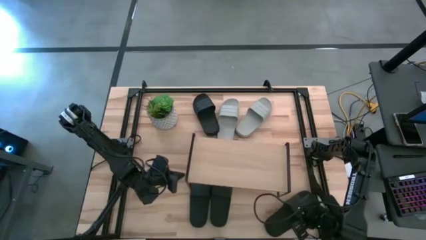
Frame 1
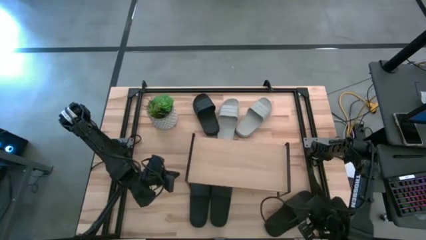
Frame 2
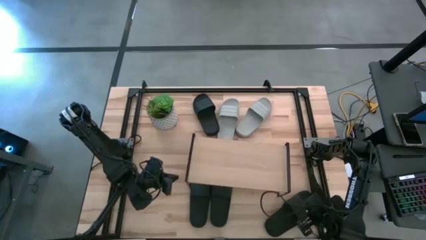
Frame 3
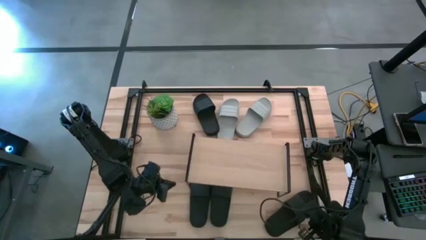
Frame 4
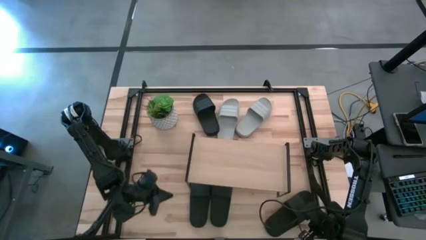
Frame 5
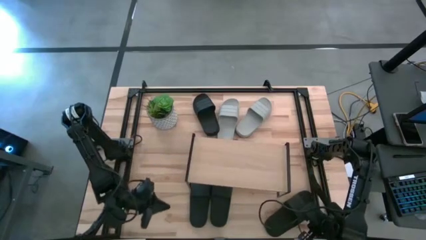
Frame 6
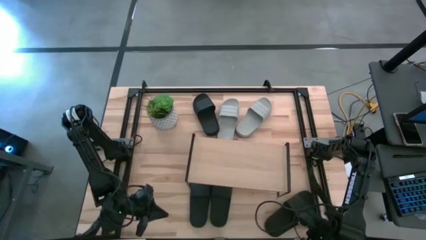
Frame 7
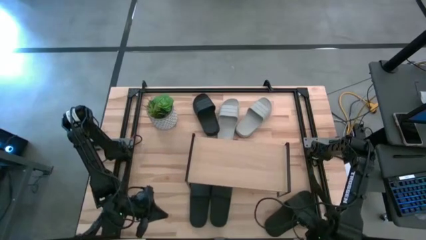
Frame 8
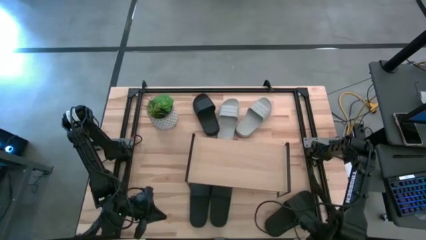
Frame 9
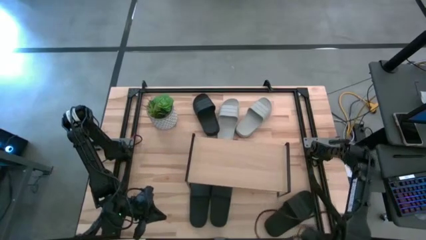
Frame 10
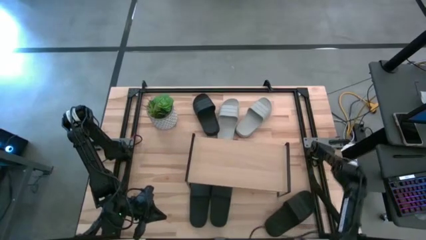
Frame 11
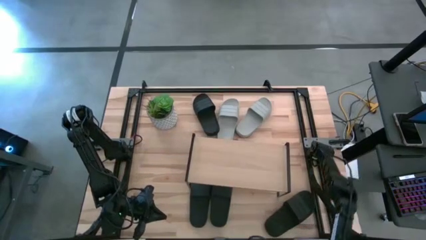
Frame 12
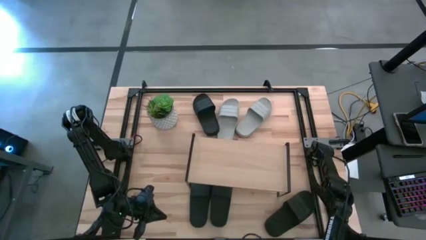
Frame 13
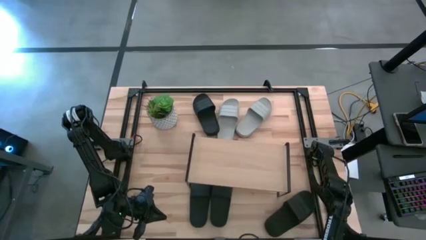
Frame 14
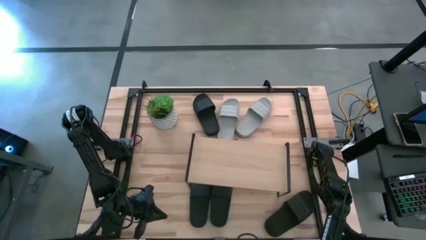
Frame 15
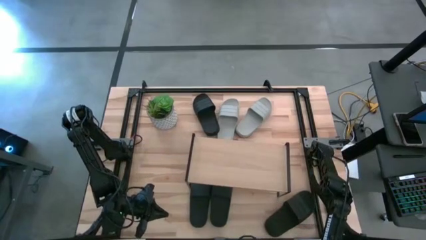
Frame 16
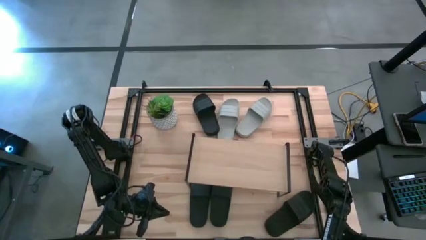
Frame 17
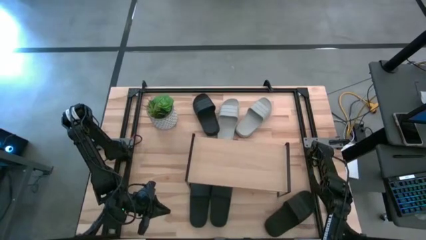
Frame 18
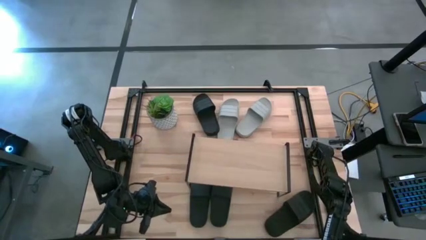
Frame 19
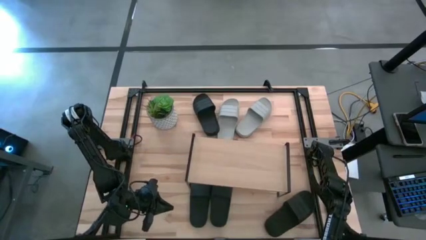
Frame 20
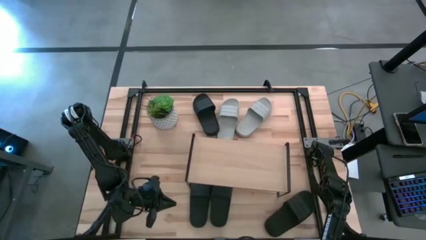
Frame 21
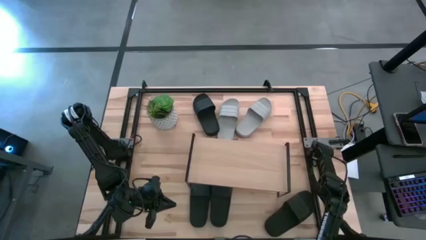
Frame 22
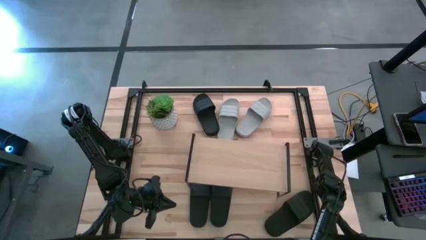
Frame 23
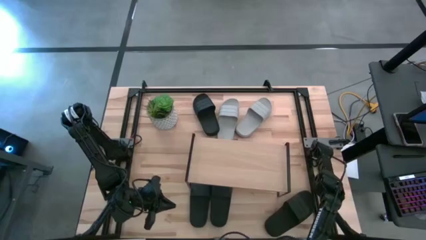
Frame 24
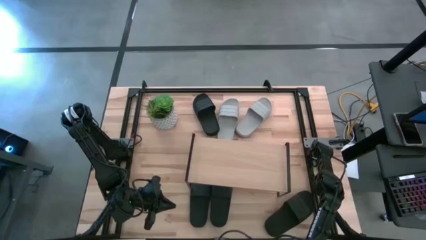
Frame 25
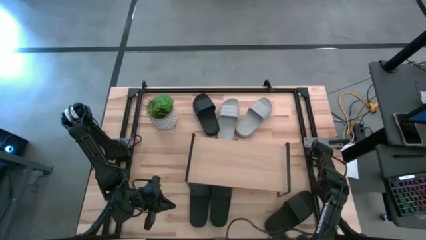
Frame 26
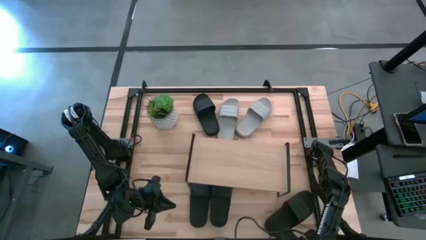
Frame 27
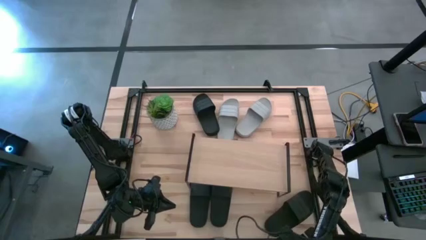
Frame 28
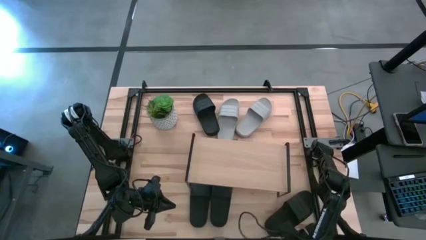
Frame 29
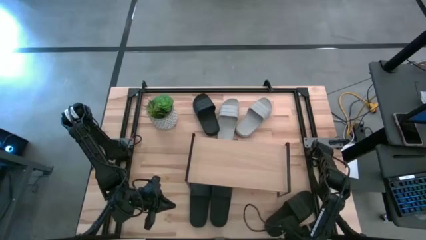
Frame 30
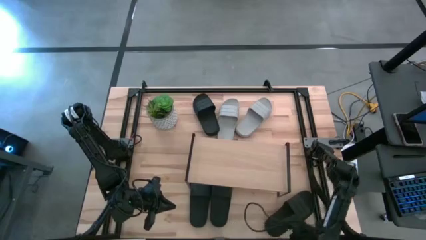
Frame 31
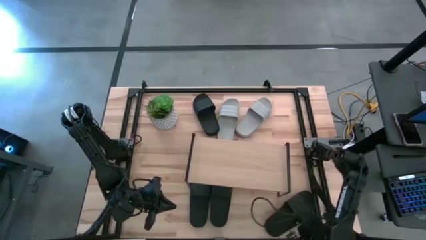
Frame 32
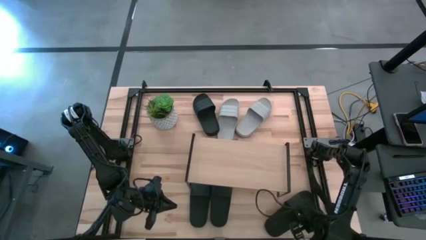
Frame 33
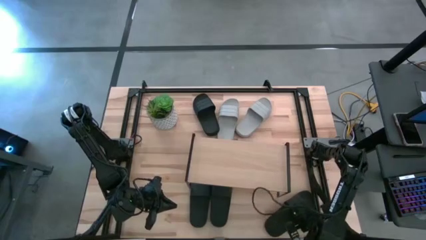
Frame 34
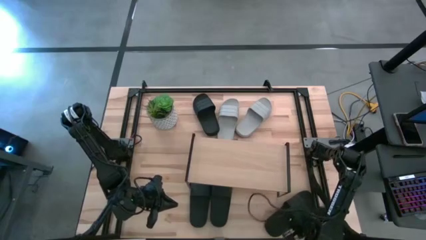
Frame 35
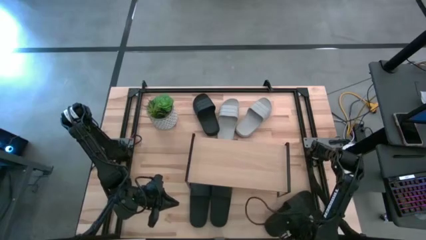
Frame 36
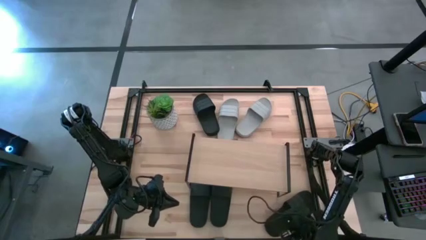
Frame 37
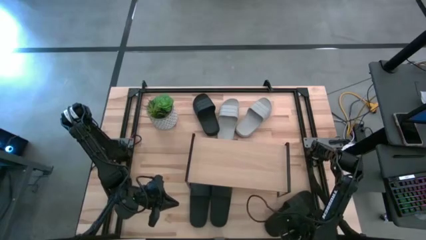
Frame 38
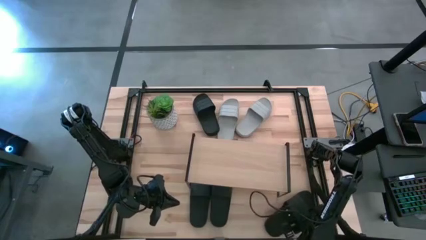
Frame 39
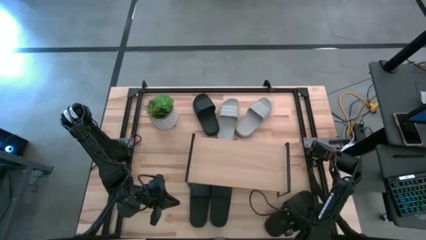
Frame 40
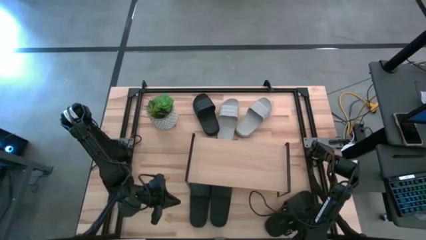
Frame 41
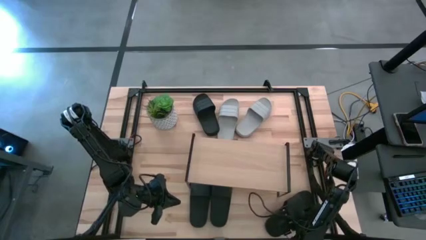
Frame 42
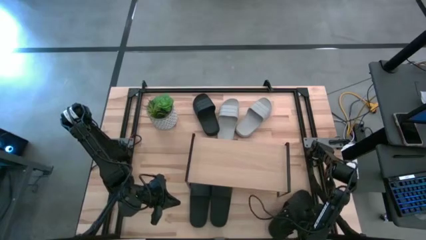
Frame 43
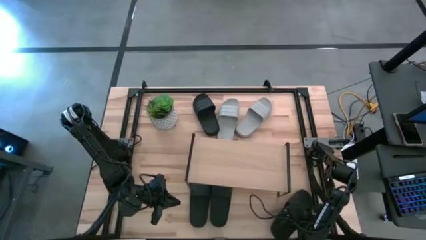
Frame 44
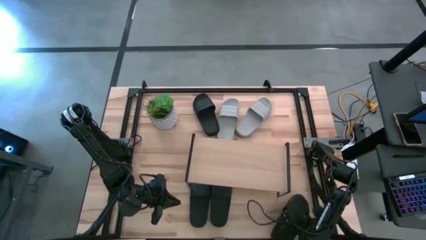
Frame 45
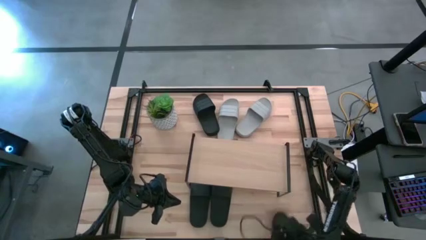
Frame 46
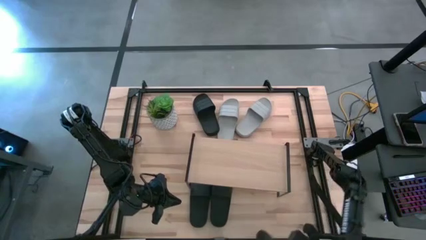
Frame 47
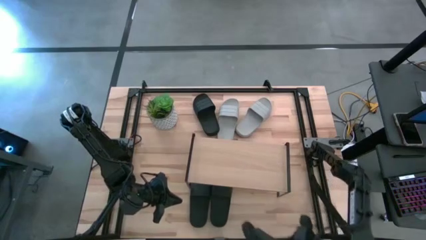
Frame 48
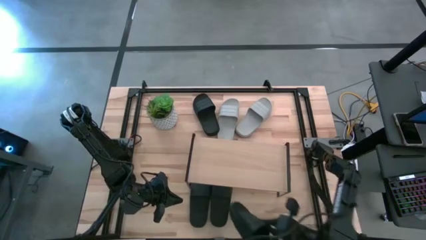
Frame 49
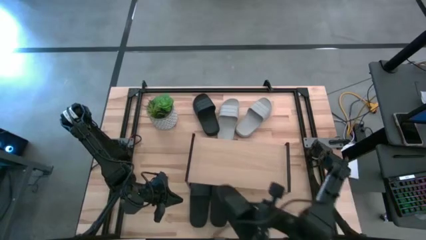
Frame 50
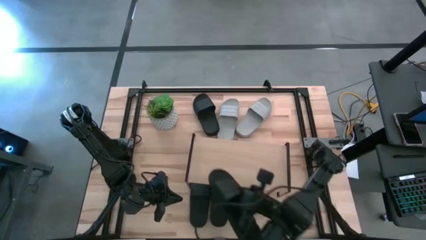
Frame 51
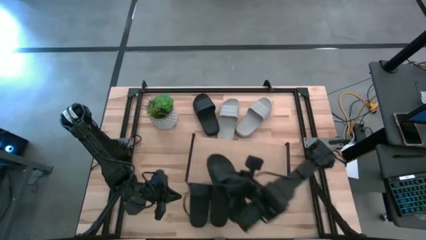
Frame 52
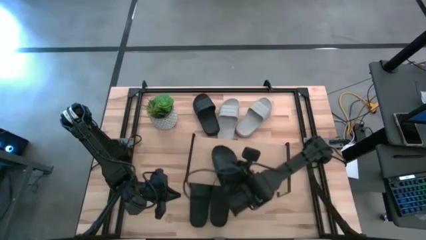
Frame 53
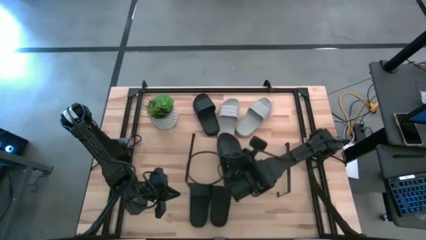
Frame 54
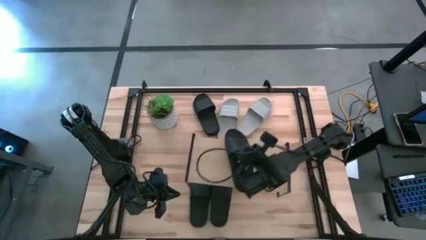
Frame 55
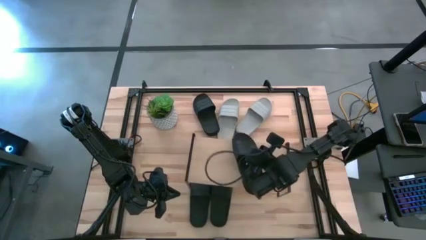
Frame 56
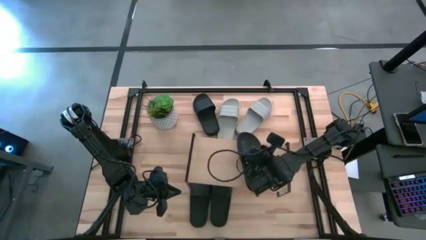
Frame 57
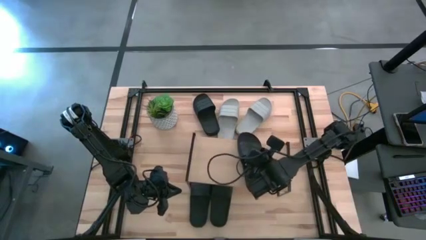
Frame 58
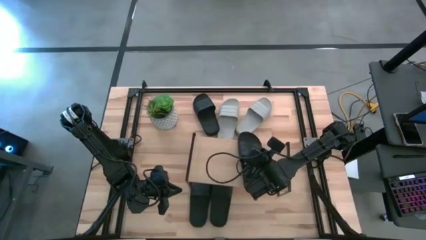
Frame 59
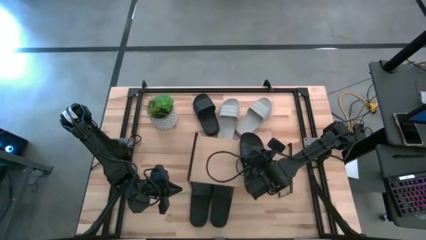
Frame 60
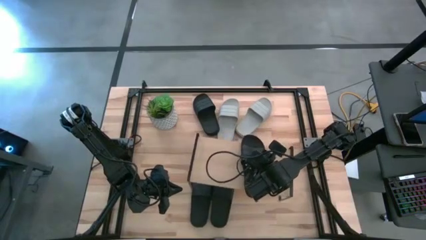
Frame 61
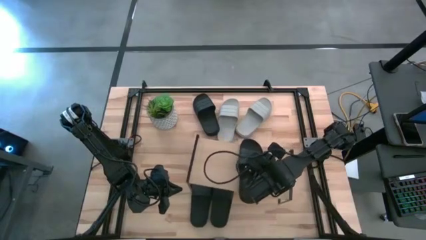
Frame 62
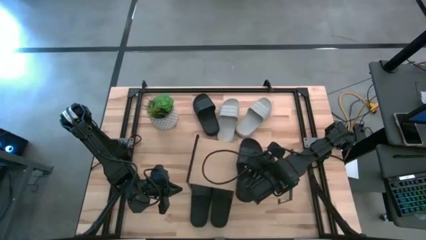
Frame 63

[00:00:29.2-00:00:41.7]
Task: Pick and place slides into the shelf
Put the black slide on the shelf

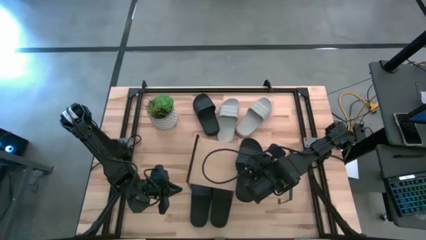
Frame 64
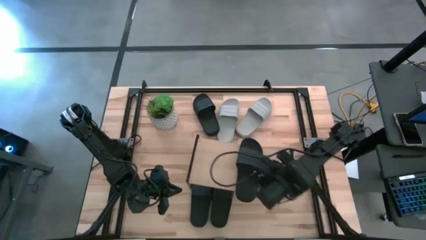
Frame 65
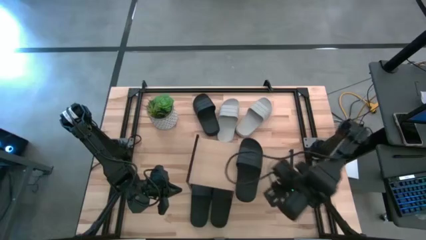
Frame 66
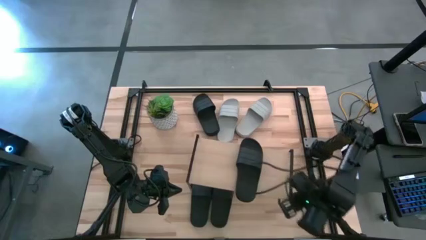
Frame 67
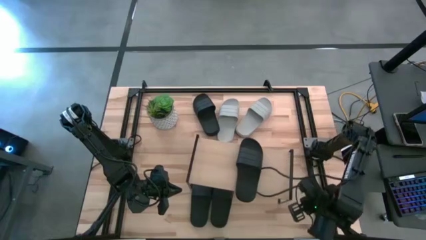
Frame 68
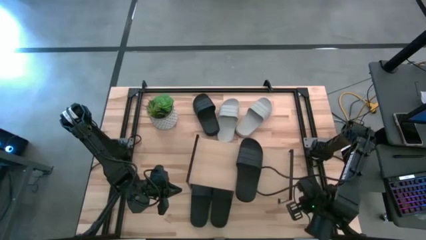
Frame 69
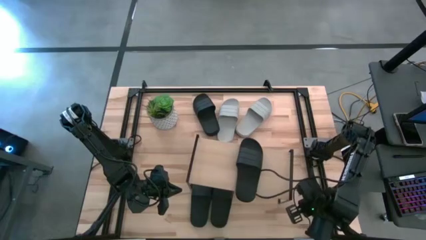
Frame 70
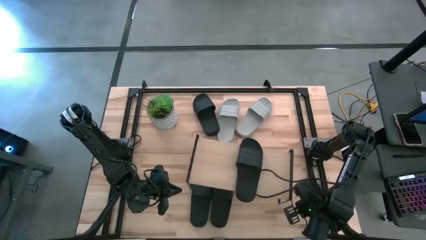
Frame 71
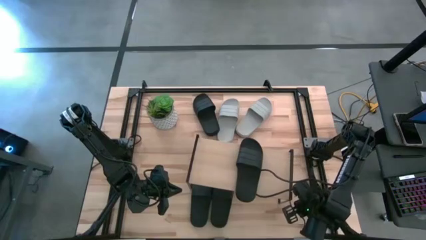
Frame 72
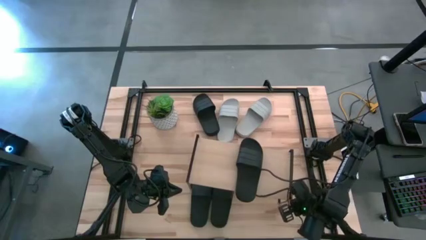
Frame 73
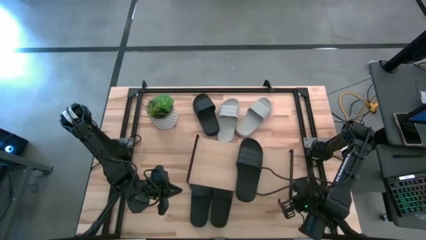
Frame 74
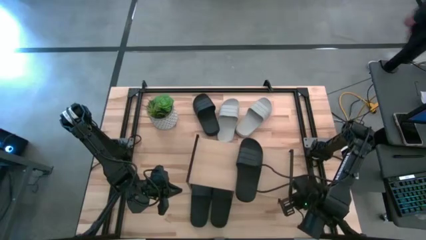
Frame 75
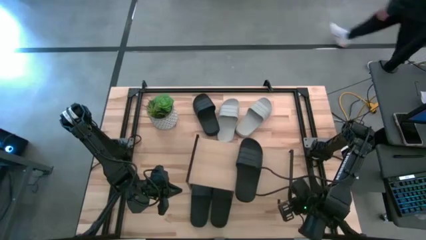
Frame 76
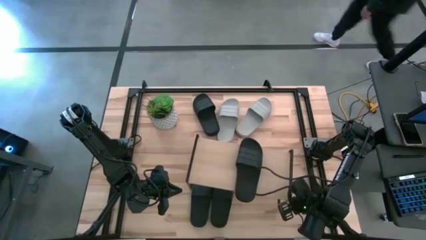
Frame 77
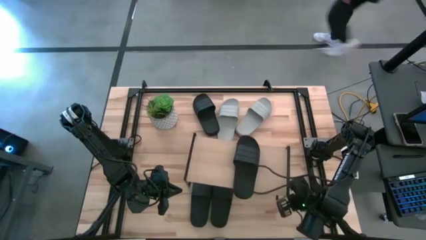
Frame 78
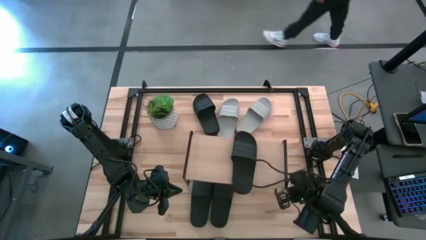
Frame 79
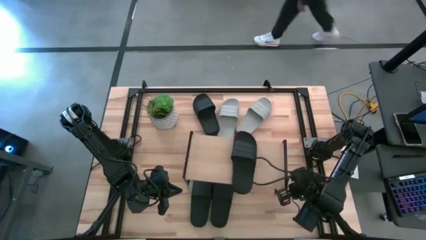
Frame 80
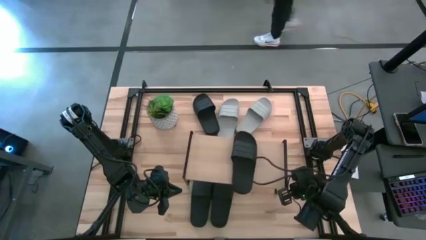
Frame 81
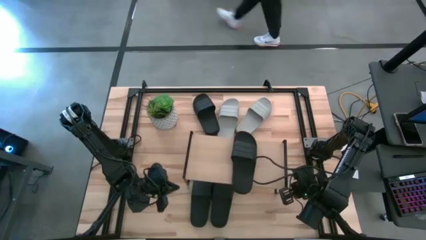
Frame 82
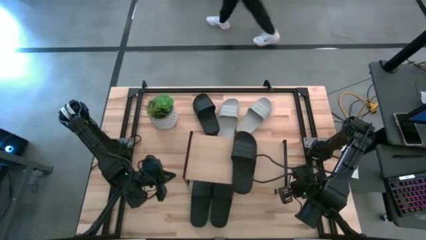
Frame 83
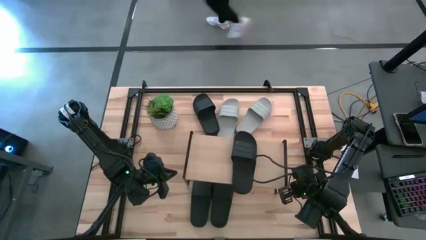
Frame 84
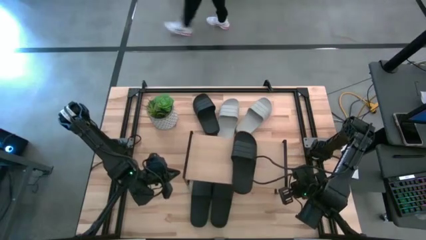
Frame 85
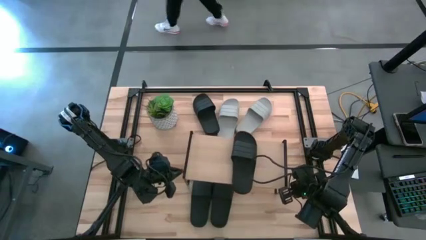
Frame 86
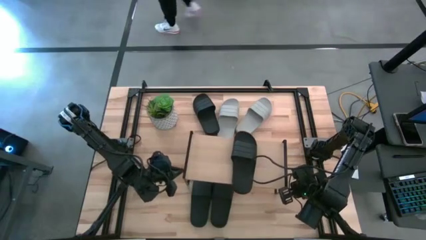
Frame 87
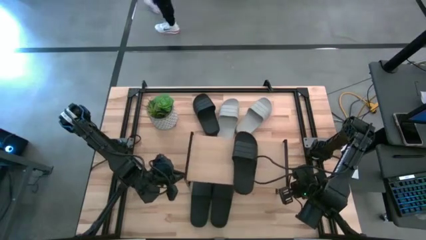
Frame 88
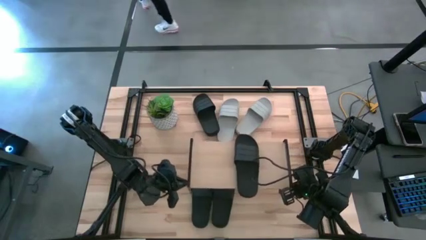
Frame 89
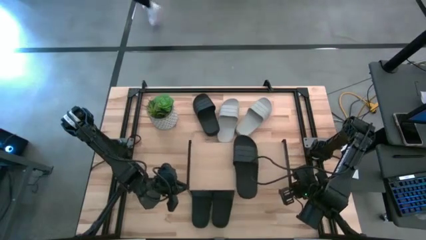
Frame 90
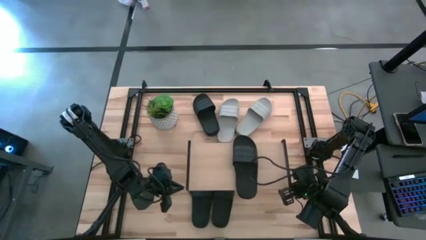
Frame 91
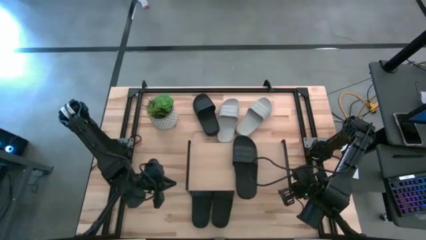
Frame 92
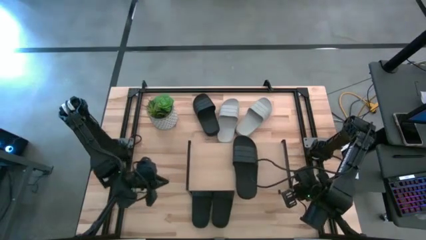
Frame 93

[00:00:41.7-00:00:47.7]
Adjust the shelf
